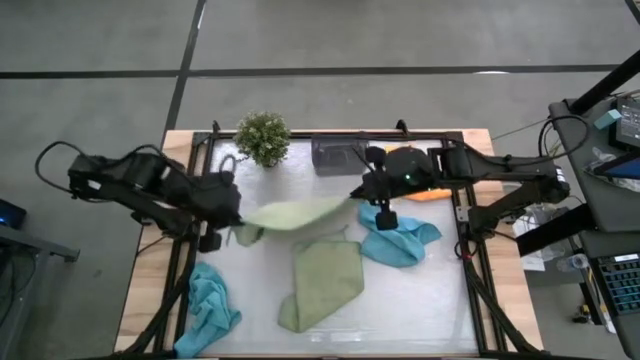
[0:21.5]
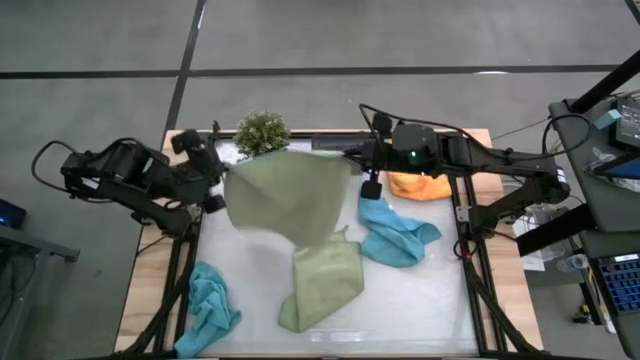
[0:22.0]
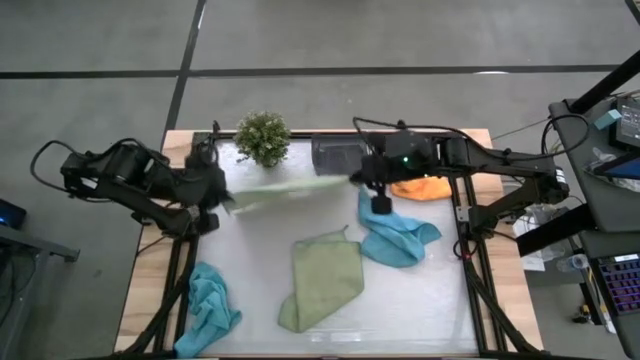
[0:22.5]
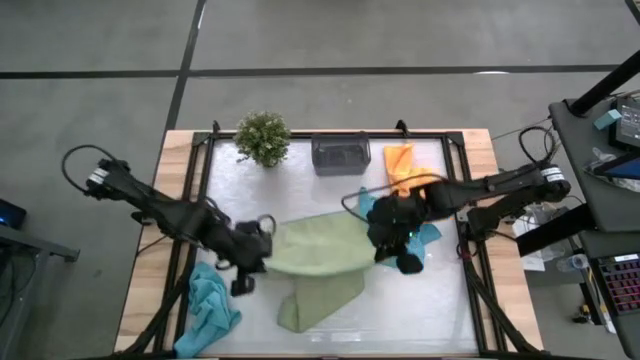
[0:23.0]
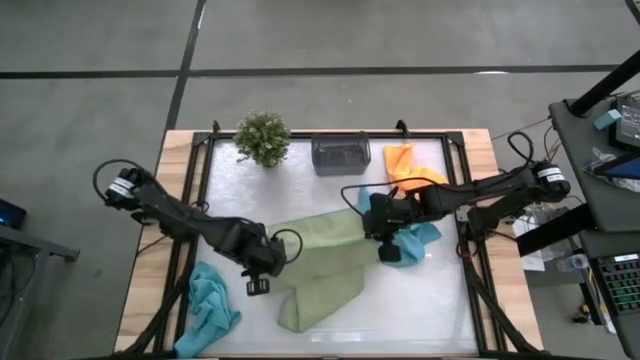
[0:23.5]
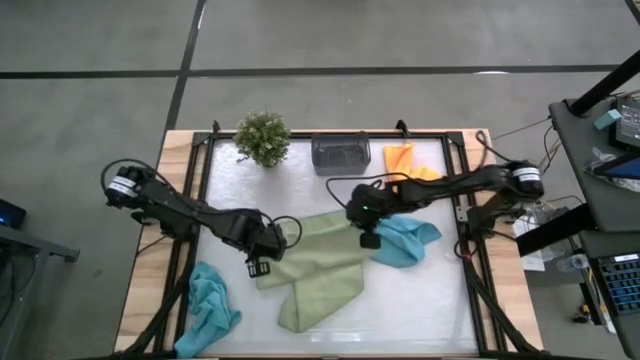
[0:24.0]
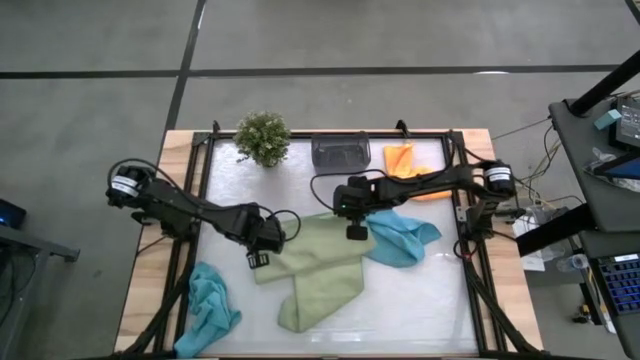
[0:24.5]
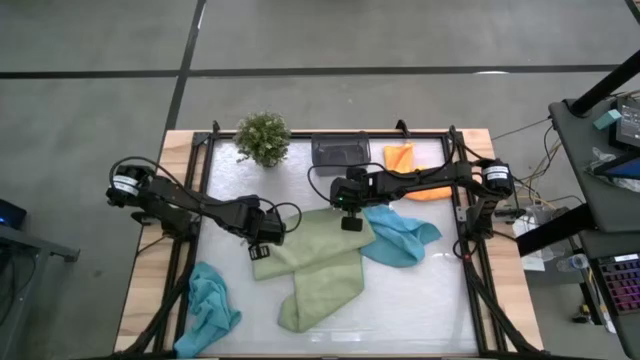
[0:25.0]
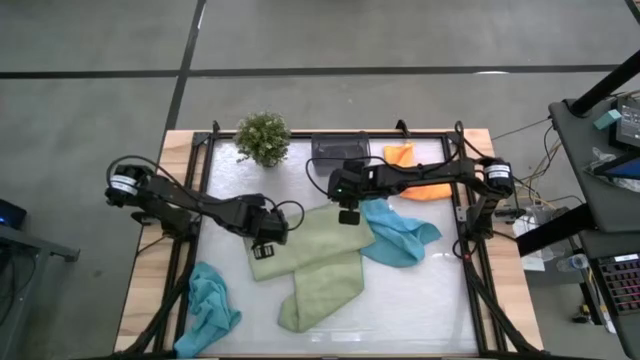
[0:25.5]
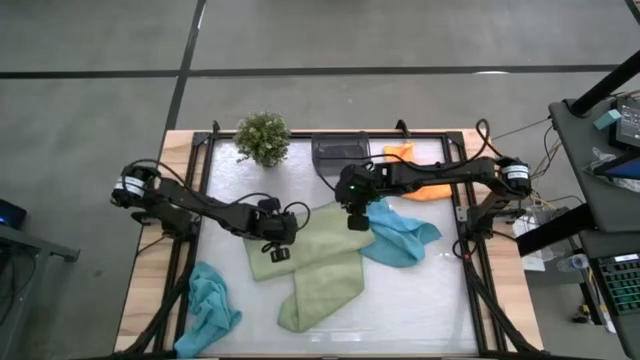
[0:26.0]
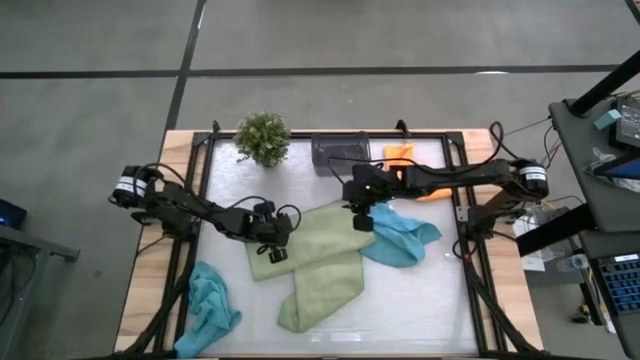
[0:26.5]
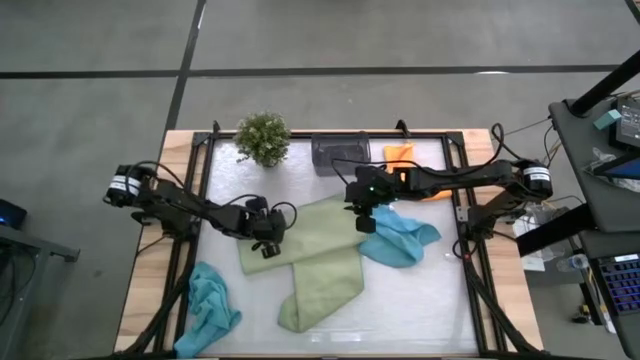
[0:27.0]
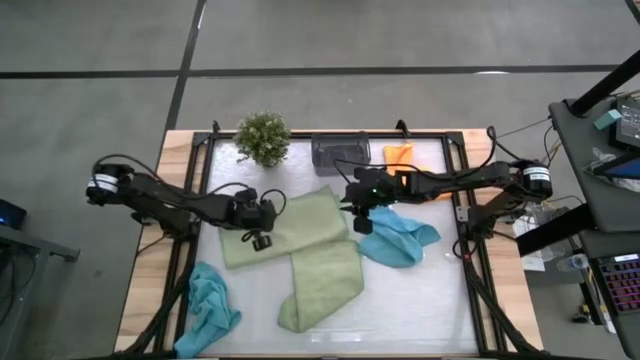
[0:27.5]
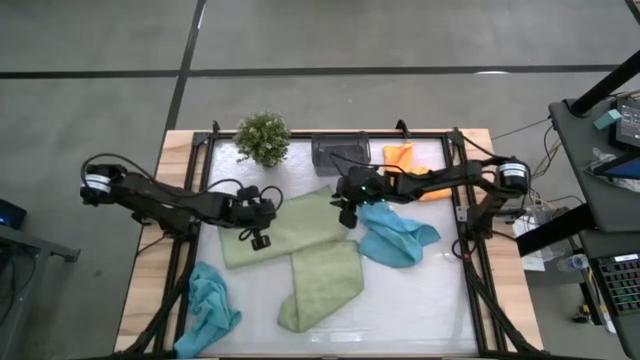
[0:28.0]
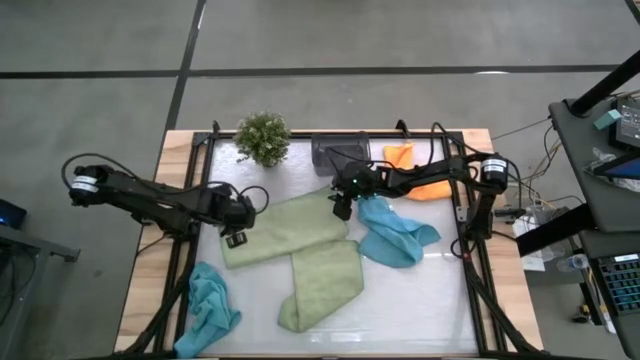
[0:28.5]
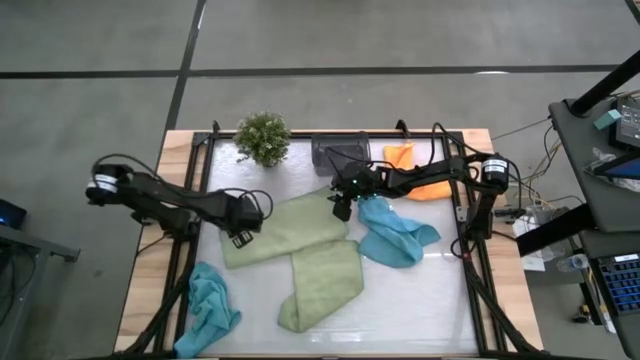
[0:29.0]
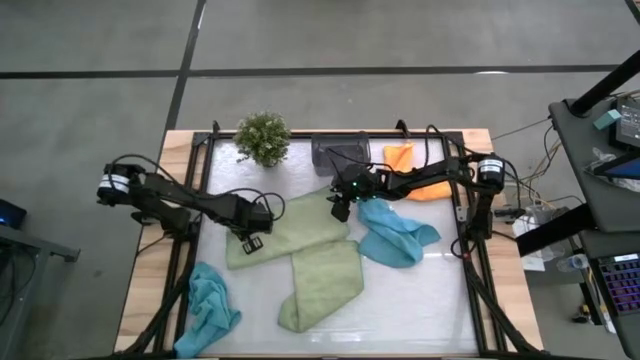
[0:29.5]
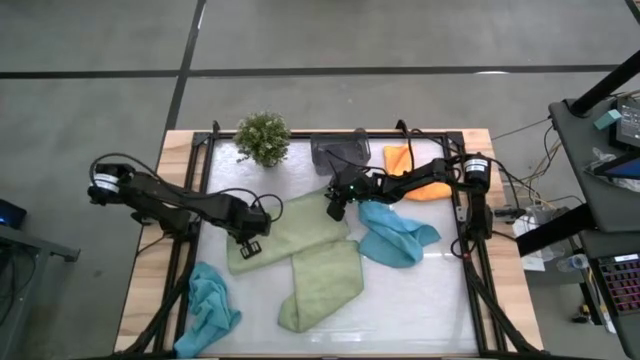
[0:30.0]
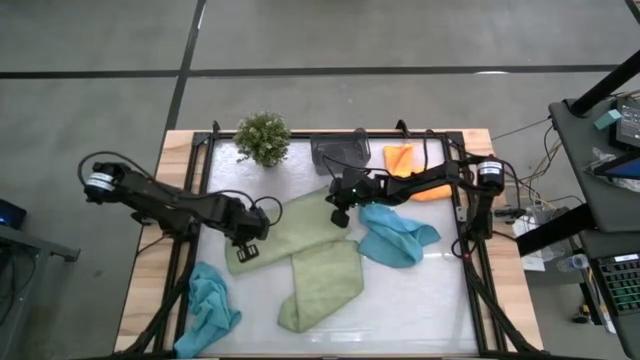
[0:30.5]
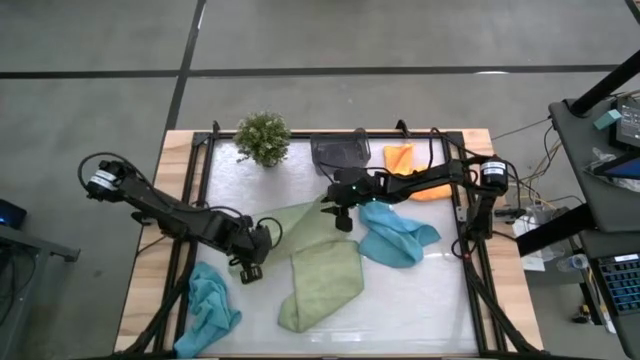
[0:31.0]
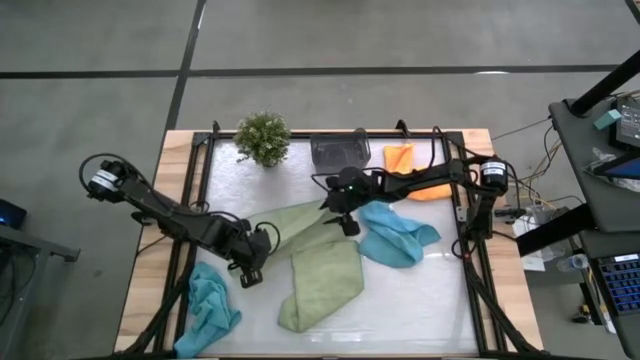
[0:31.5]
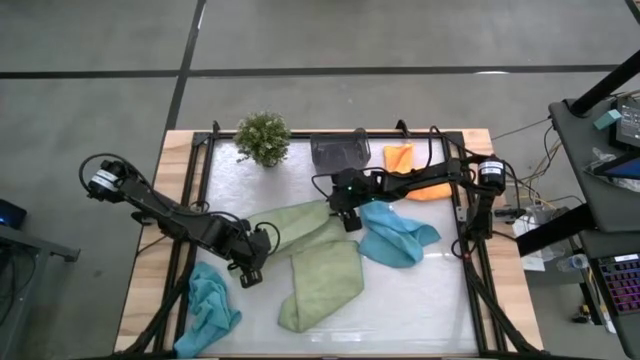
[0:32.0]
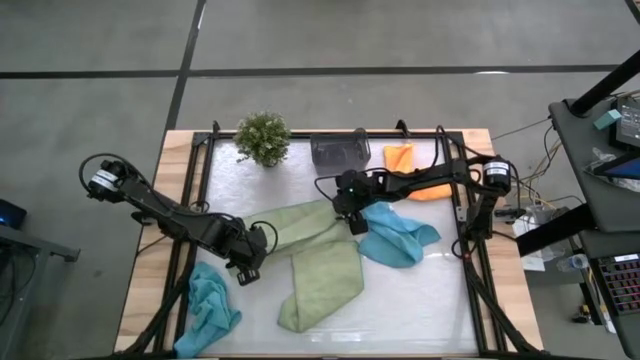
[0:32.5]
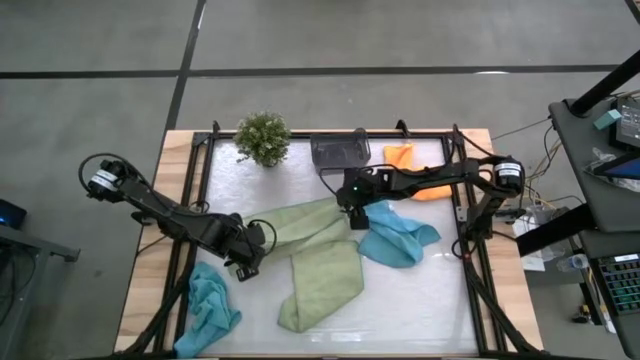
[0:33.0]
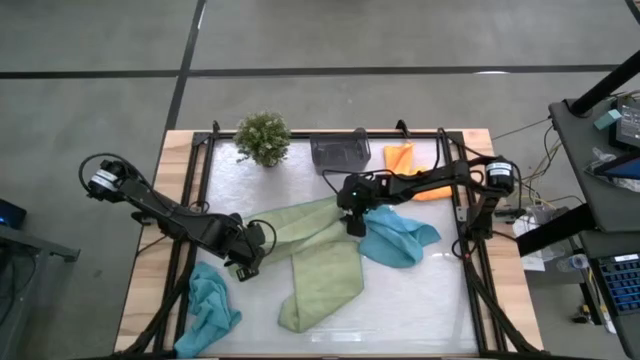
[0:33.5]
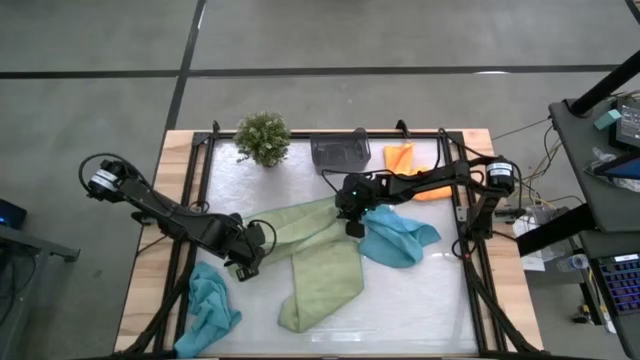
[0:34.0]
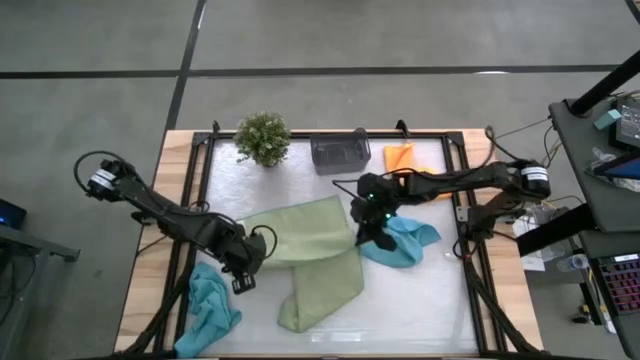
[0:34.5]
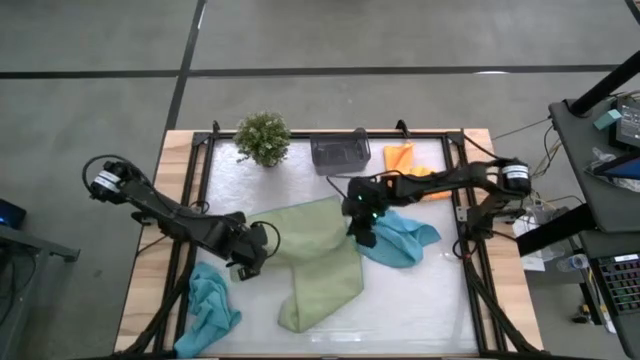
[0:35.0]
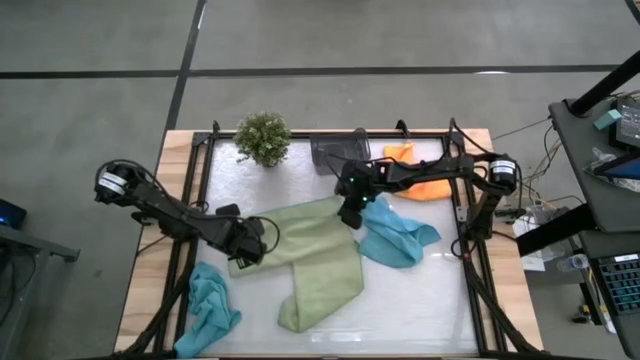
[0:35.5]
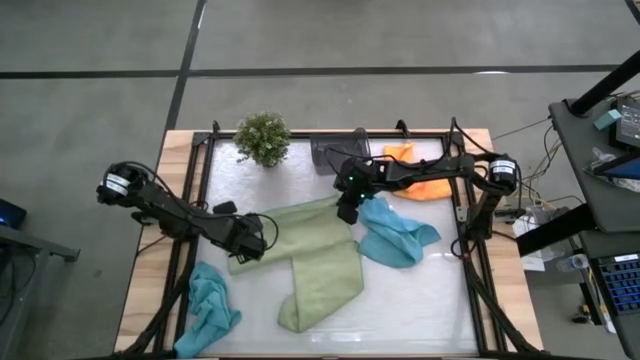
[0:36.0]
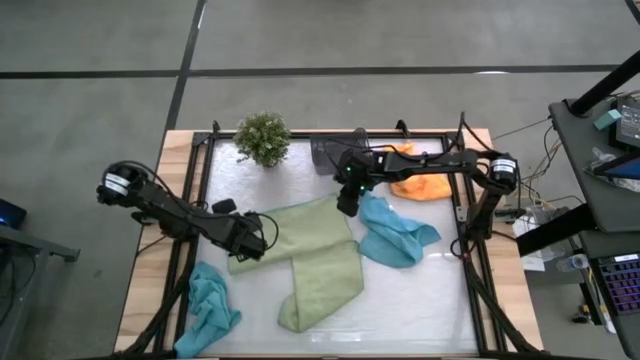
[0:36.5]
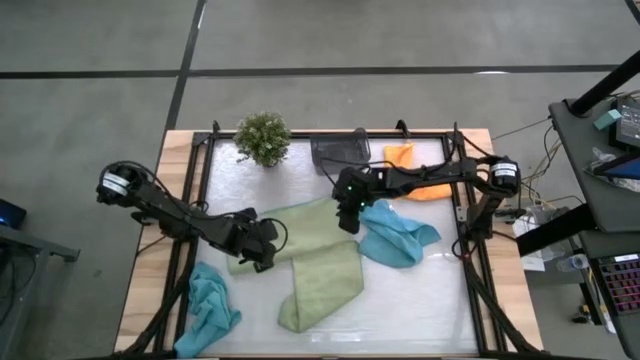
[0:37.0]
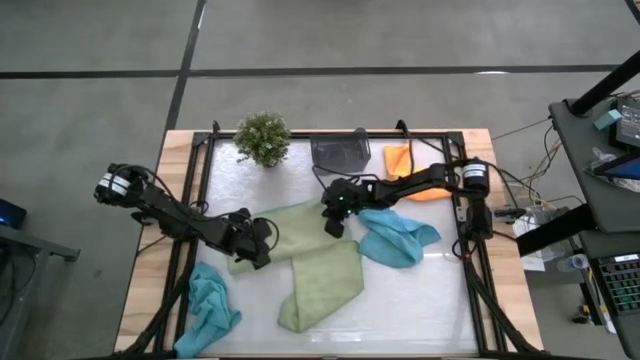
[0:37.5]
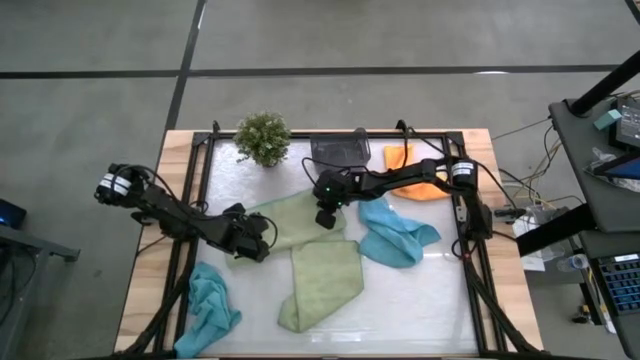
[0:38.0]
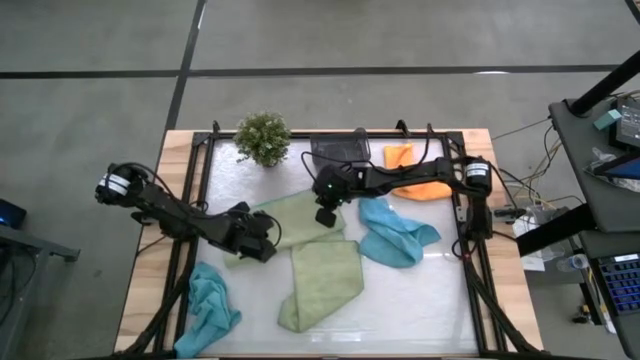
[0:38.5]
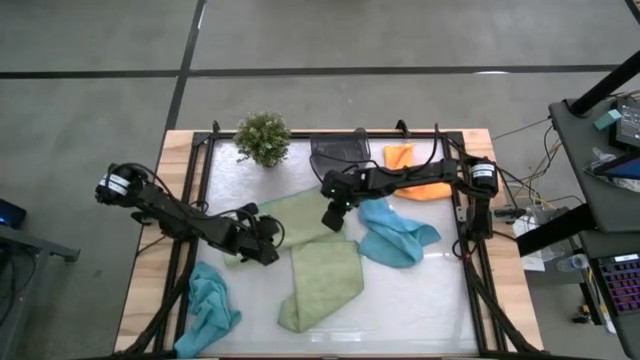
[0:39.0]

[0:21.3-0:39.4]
Task: Fold microfiber towels
Fold the left green towel

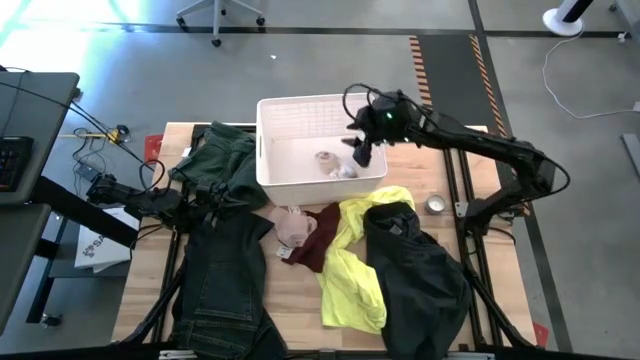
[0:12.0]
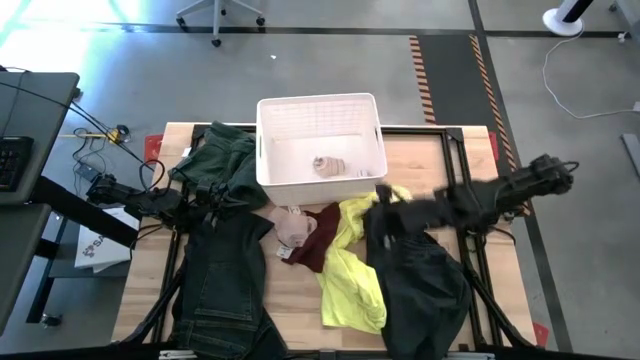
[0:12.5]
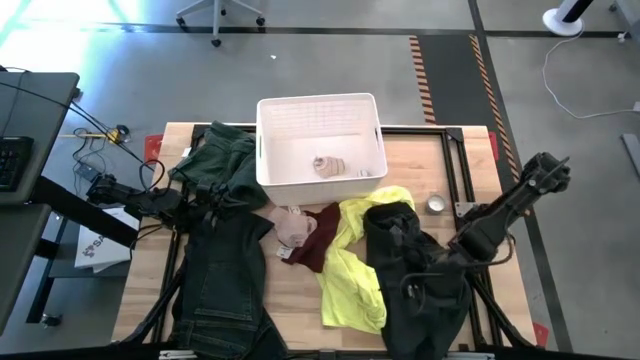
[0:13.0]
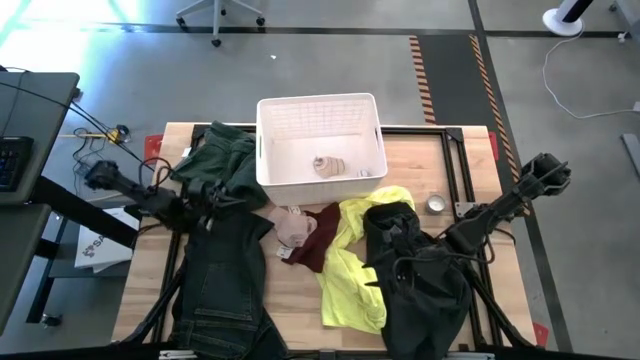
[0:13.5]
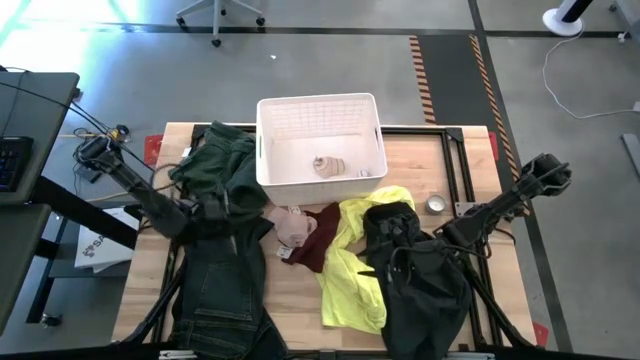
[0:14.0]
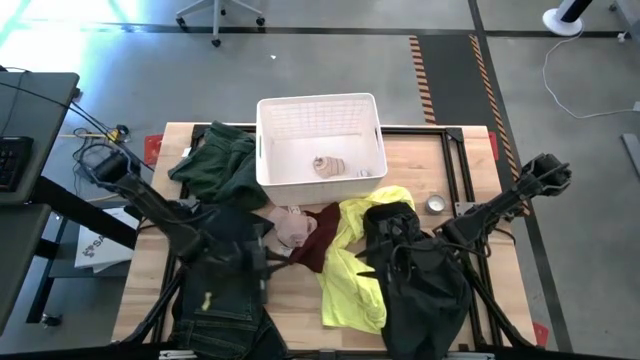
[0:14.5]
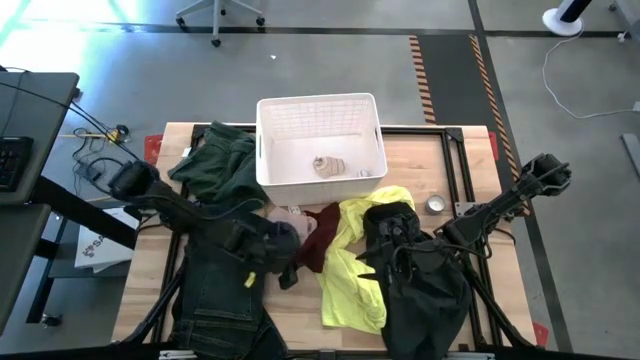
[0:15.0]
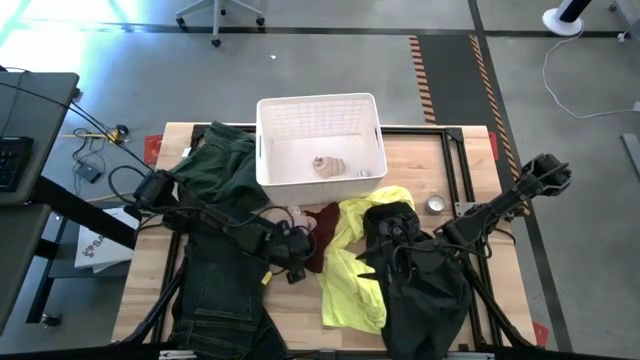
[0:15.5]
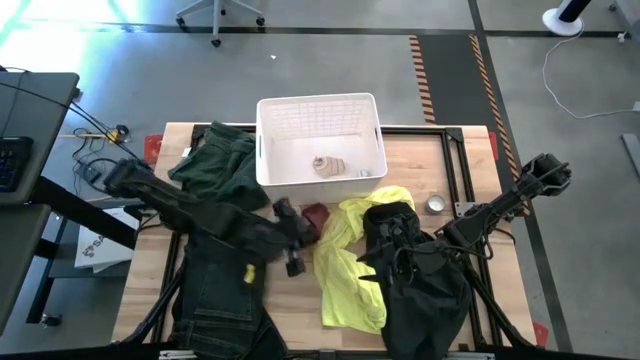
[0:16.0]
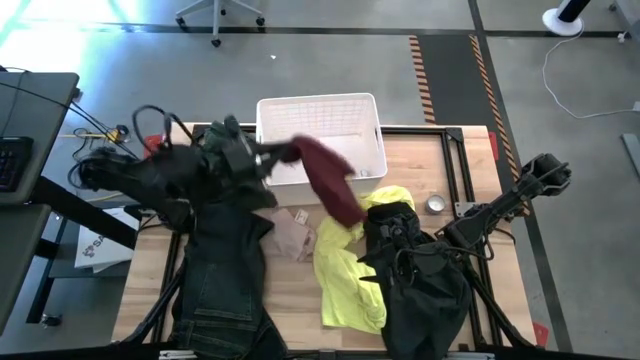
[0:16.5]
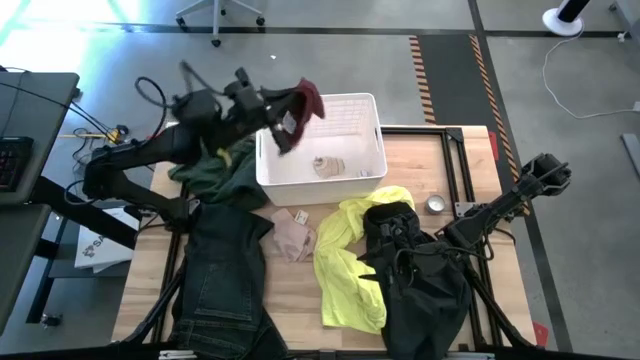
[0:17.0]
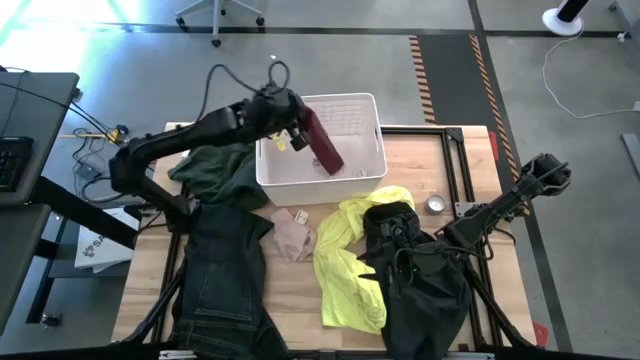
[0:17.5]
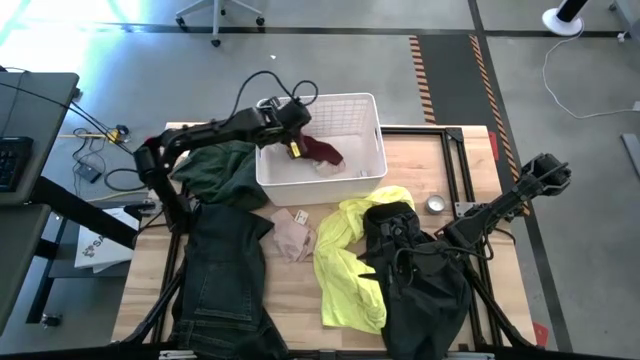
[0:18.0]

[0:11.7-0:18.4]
Task: Sort clothes
Put the dark red underwear into the white laundry bin
